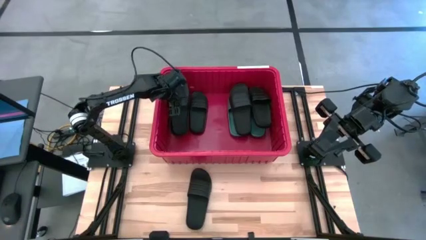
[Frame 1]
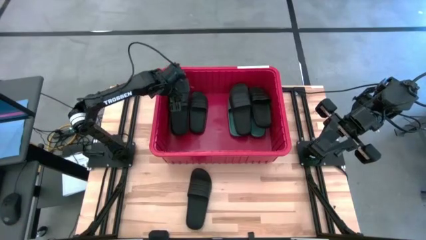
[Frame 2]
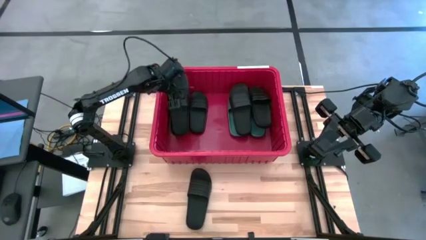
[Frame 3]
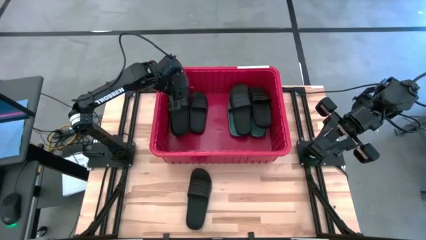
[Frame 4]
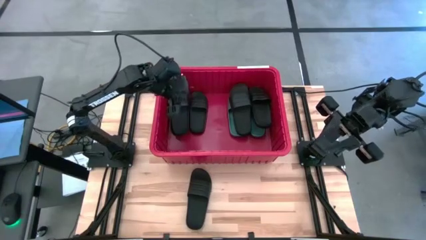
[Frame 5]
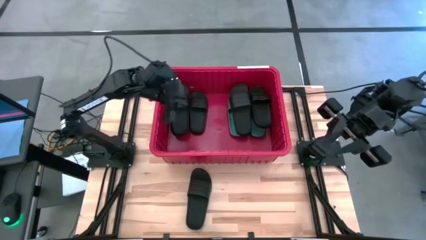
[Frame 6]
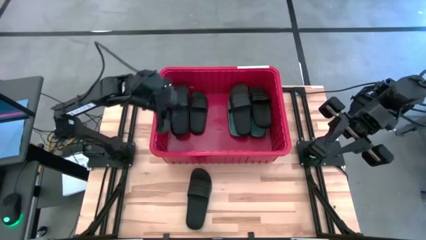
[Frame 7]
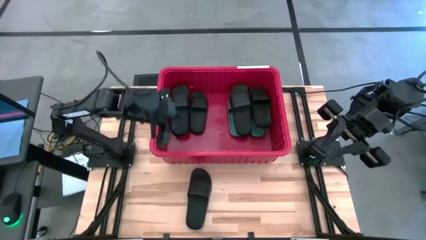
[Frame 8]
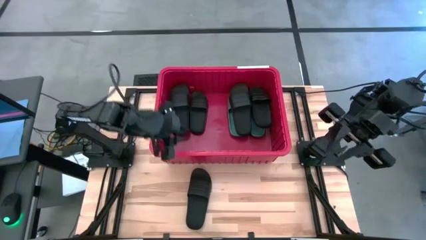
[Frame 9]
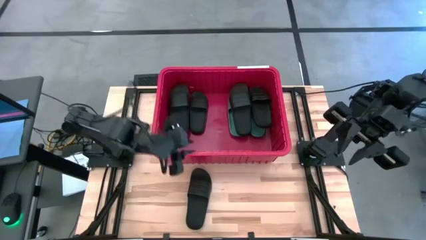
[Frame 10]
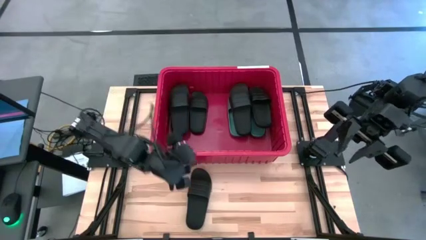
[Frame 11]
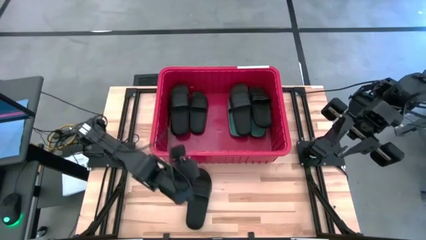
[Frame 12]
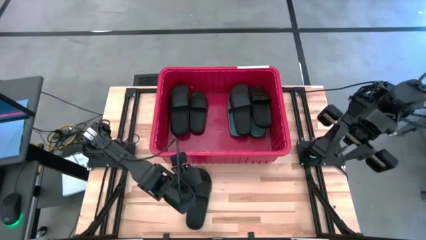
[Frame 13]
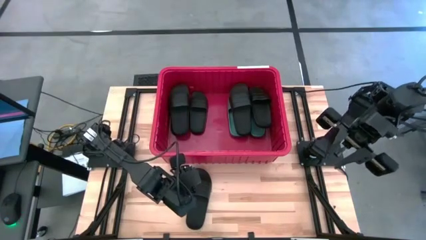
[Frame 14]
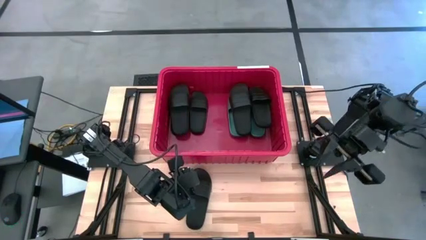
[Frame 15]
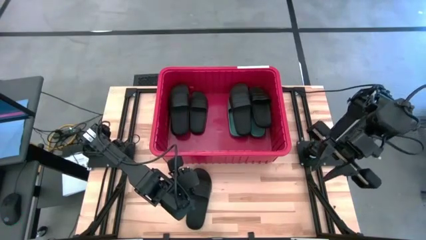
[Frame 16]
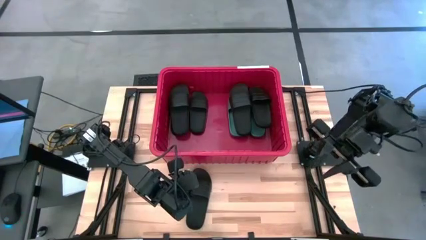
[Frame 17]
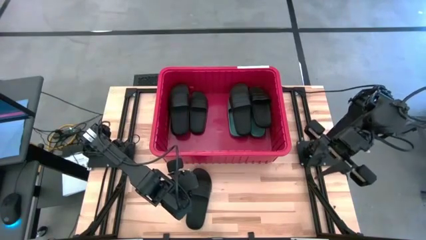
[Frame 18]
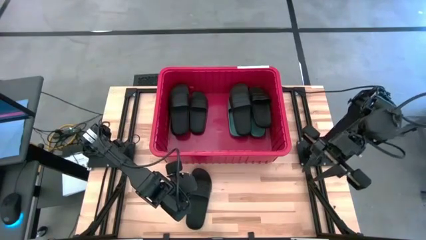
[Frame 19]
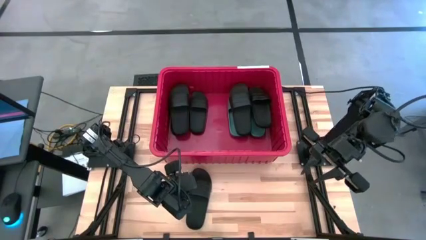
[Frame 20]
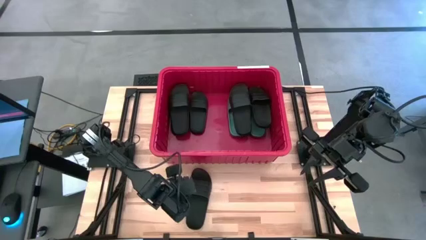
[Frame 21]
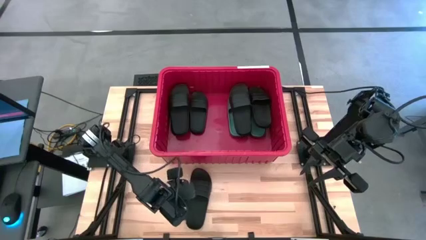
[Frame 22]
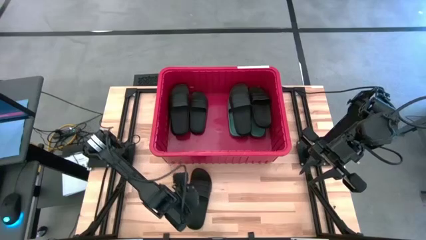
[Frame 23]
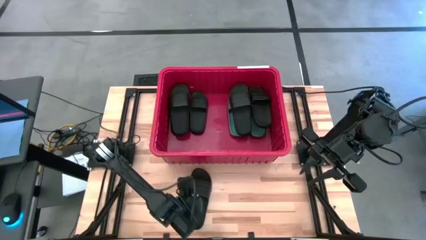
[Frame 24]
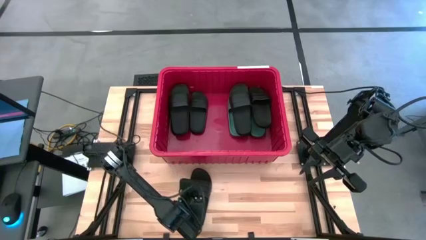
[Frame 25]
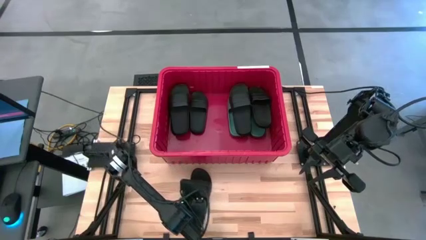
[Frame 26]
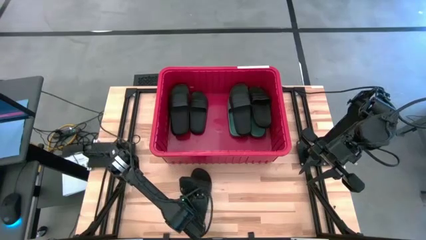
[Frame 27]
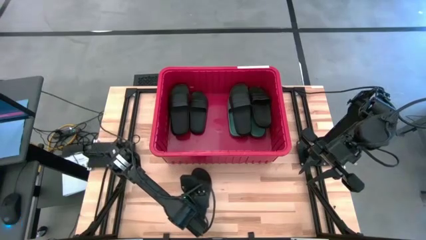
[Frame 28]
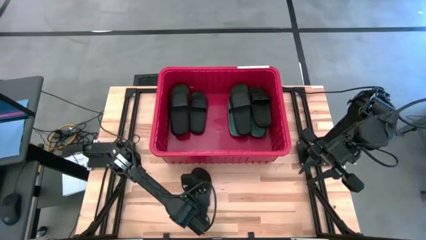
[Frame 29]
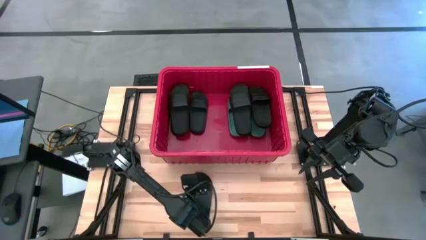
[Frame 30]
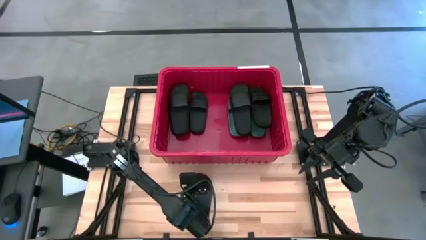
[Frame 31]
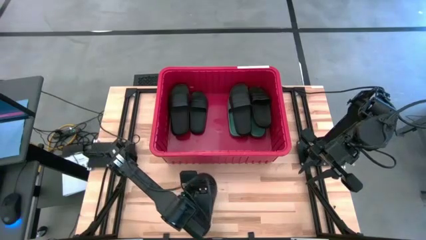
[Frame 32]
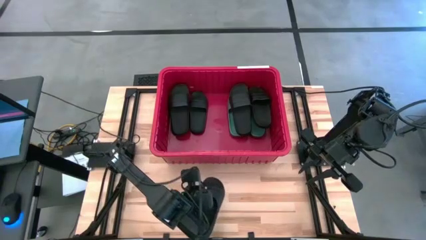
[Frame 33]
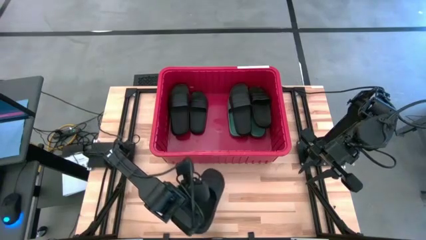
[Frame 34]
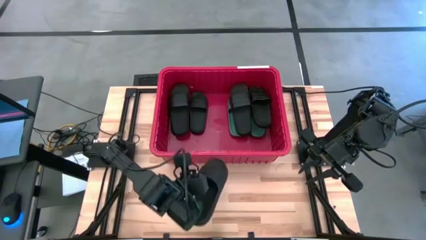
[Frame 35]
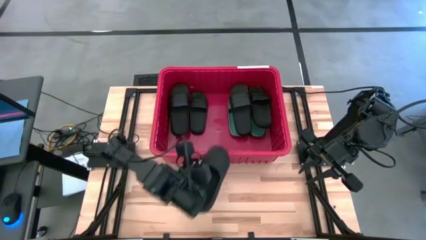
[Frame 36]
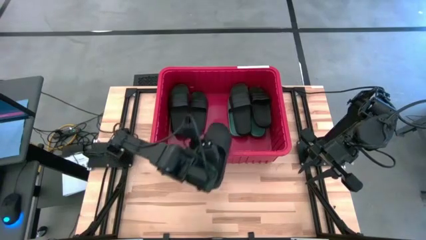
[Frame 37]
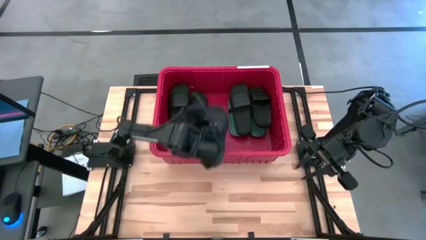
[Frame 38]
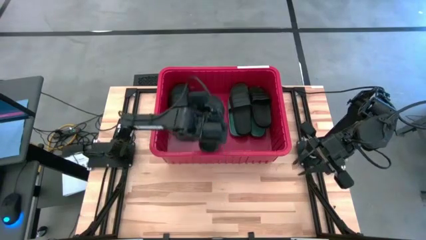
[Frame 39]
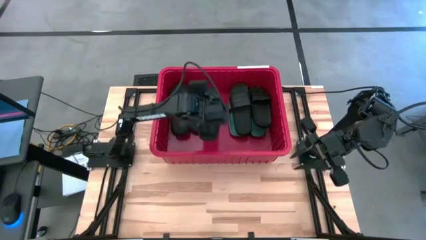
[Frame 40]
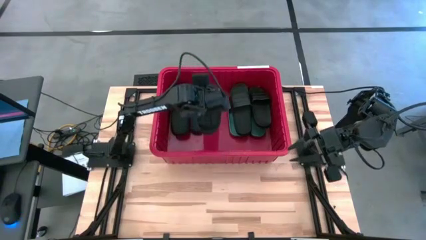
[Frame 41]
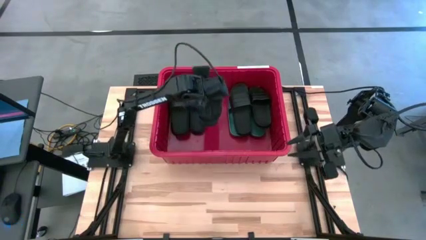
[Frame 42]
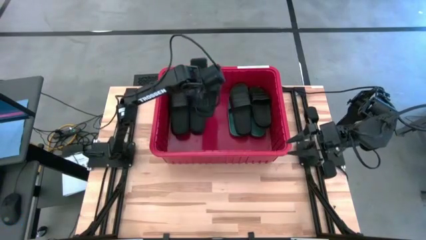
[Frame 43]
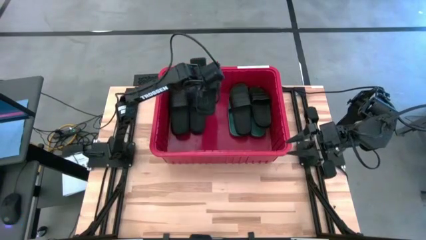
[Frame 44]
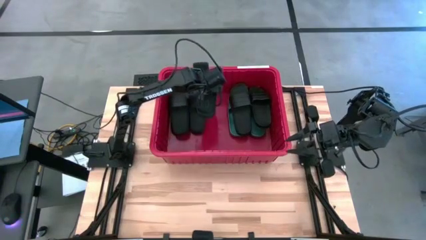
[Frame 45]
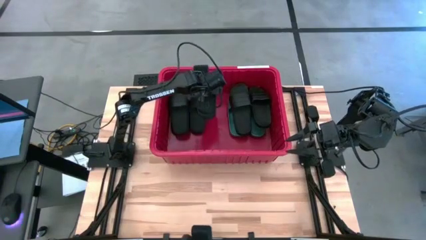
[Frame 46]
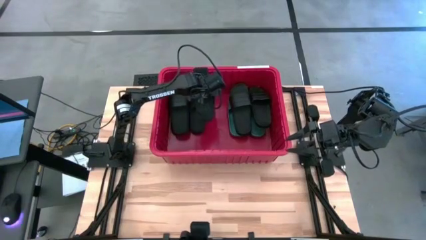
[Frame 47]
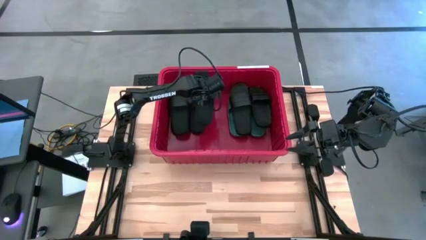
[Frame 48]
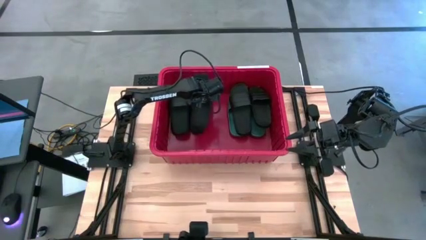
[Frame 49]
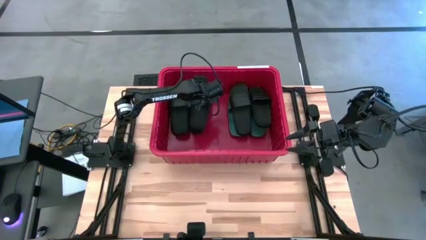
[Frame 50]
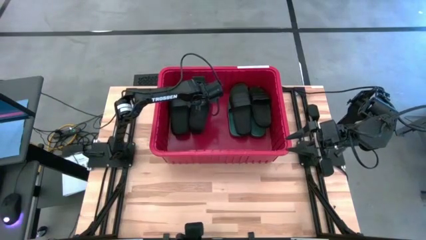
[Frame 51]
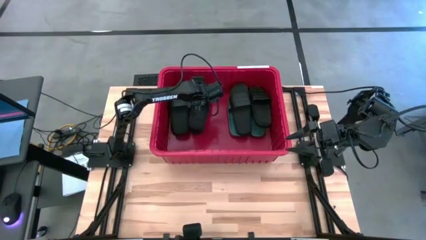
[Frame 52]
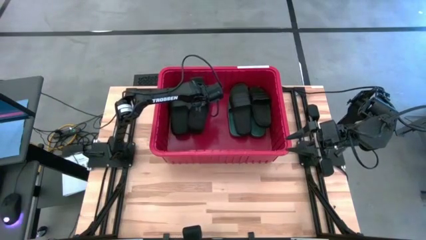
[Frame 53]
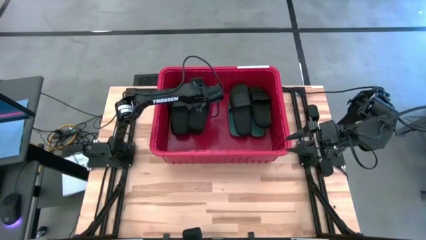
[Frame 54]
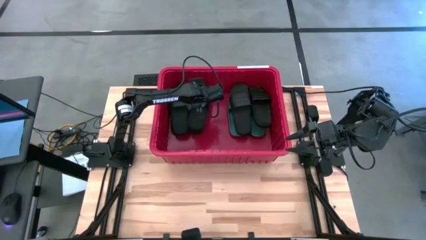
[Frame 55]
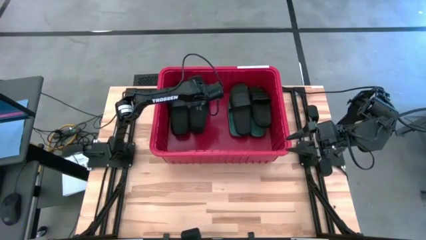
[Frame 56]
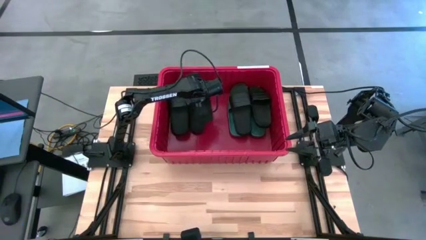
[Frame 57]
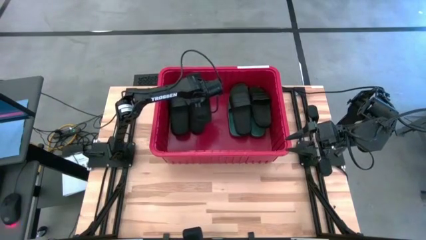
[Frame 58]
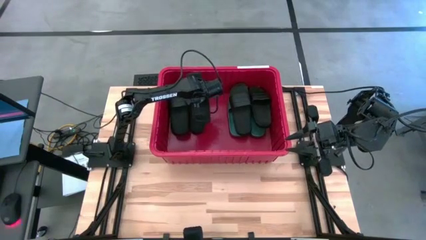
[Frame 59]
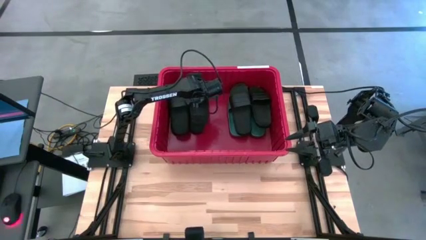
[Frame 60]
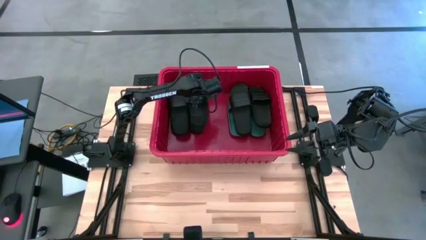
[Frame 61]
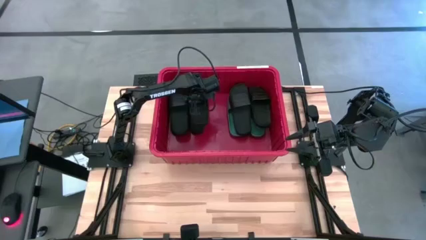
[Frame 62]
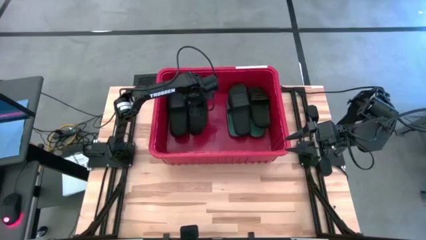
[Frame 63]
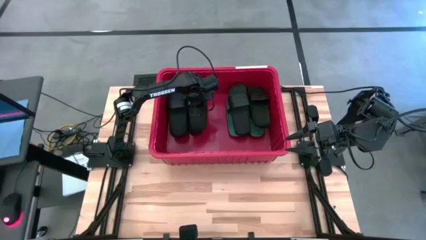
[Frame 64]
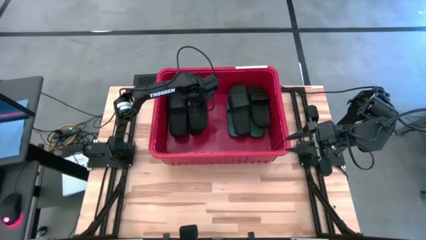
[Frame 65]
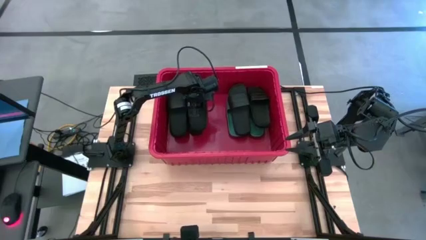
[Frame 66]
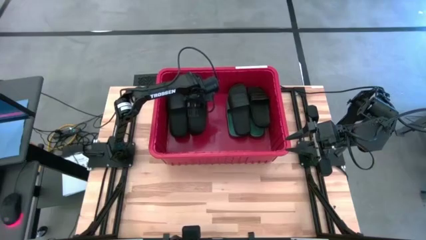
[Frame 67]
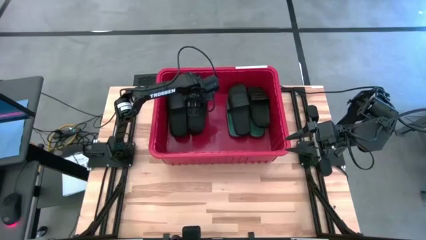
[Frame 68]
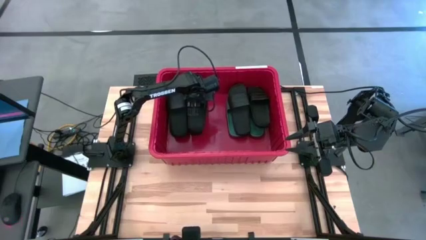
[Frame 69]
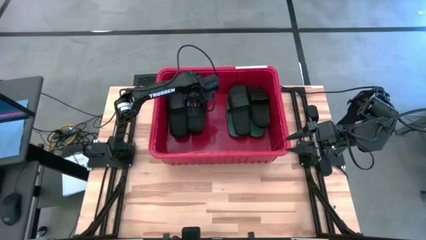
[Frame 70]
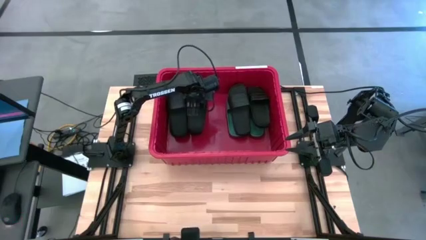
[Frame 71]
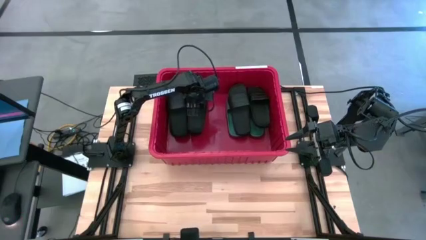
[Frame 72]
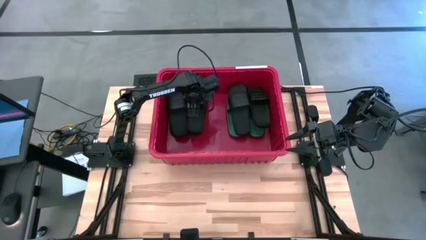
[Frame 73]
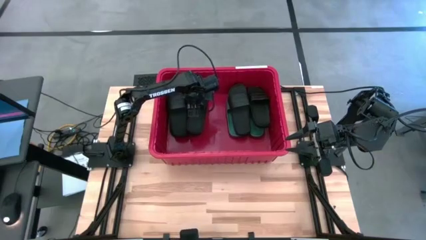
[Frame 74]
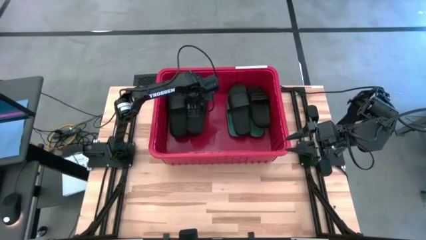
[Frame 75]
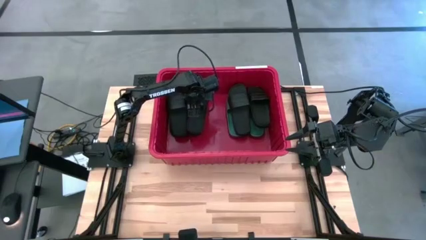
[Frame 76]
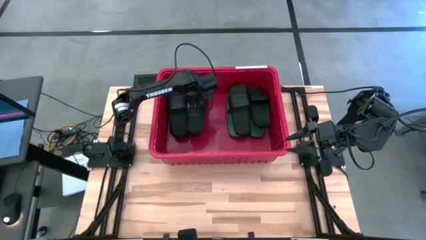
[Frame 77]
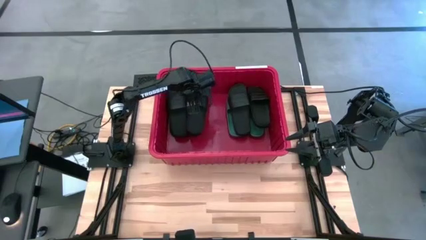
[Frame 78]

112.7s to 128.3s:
Task: Pick and place slides into bin
Put the black slipper into the red organizer bin

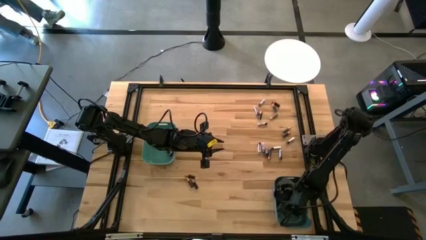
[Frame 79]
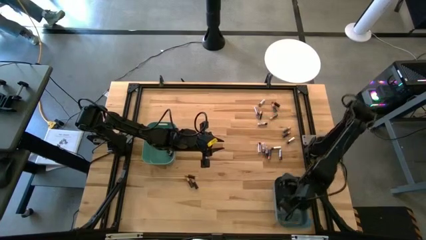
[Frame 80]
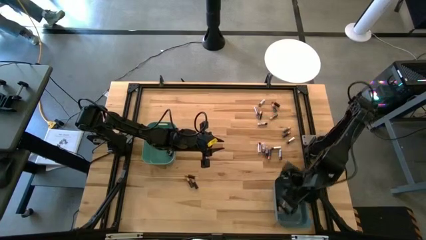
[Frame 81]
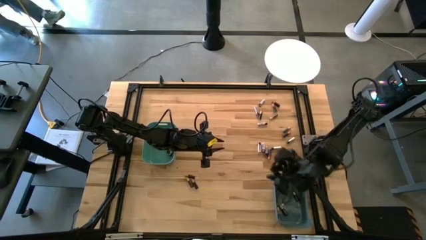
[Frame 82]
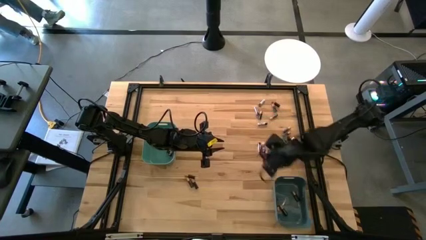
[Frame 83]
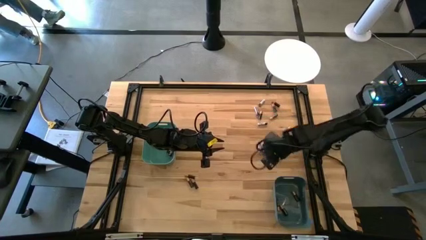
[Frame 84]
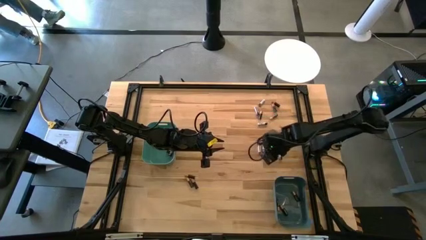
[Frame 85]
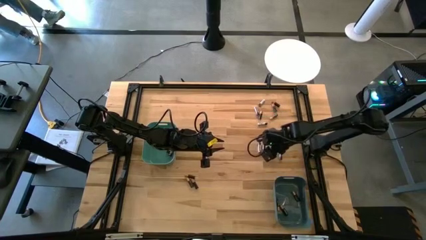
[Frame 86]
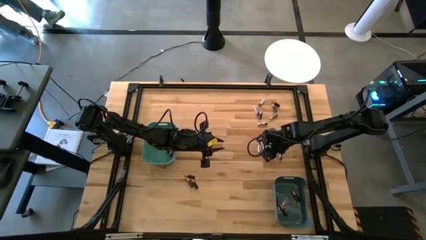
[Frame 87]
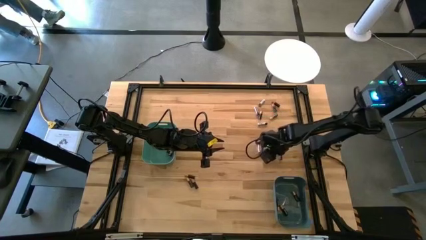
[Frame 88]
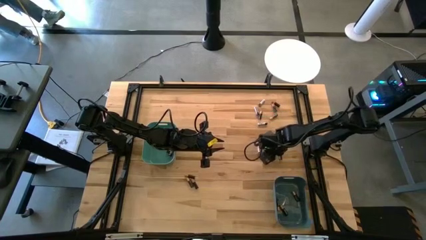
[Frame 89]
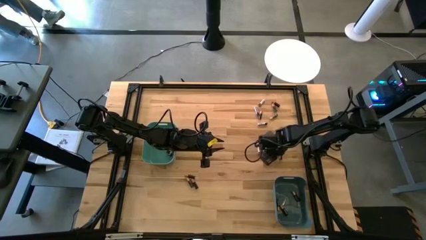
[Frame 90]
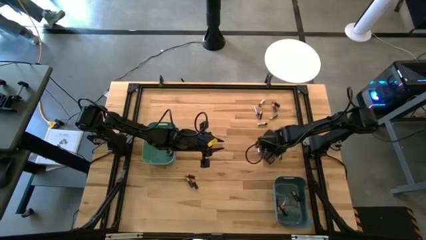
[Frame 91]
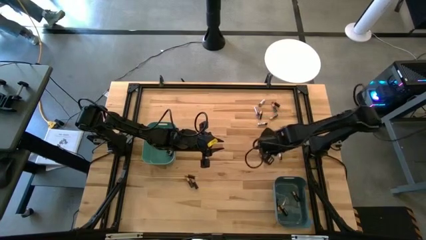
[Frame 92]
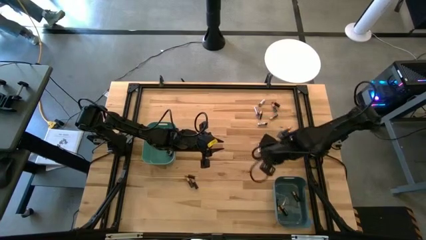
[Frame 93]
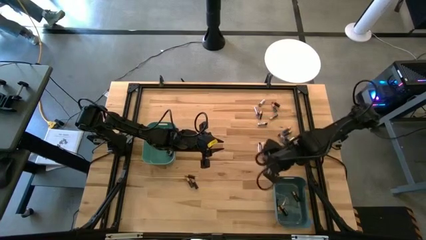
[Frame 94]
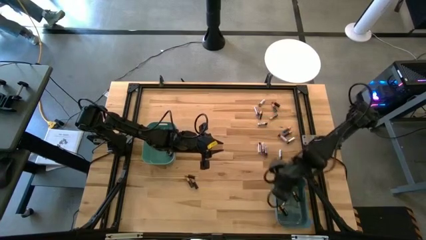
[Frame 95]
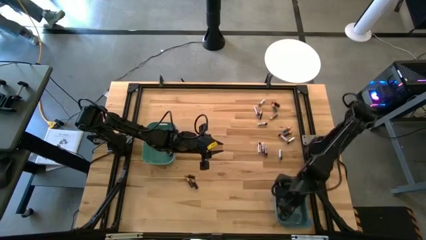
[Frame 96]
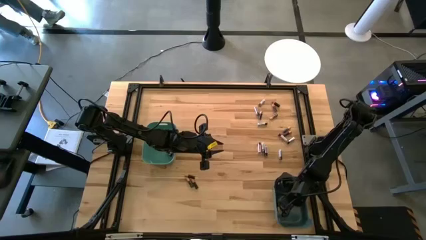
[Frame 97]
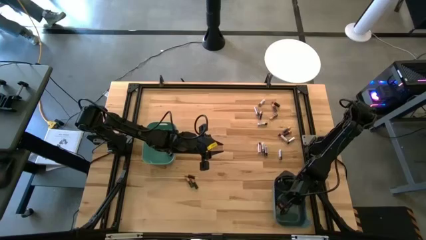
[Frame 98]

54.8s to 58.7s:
Task: Sort batteries
Put the black battery into the blue bin
